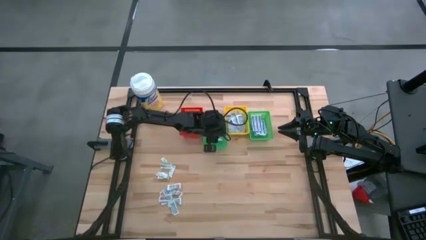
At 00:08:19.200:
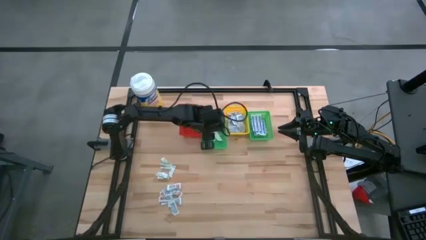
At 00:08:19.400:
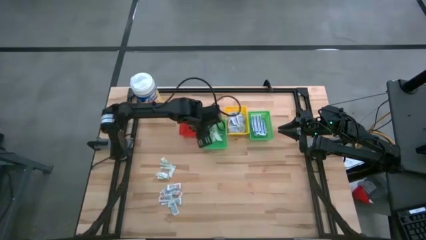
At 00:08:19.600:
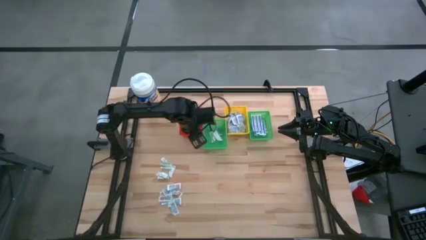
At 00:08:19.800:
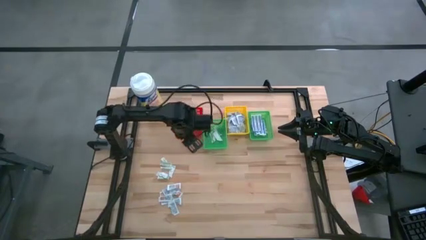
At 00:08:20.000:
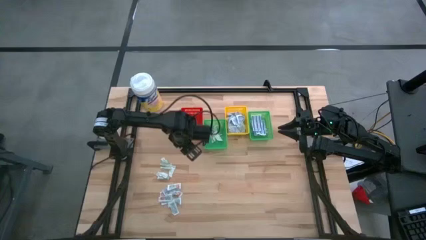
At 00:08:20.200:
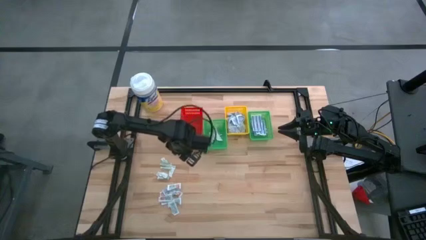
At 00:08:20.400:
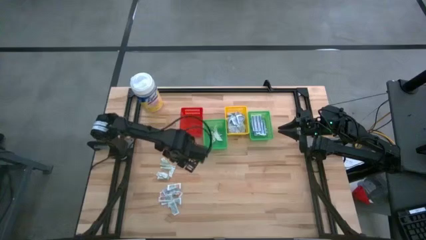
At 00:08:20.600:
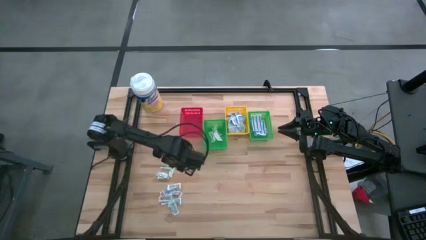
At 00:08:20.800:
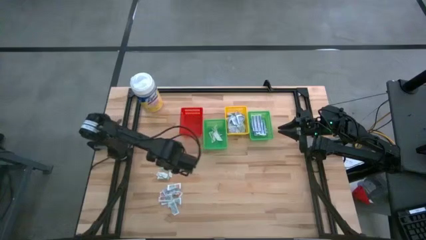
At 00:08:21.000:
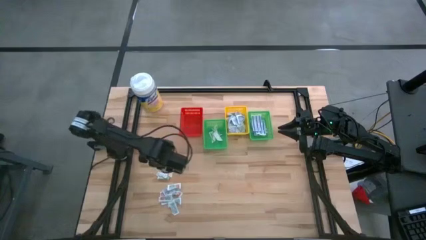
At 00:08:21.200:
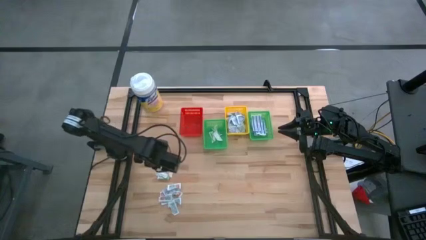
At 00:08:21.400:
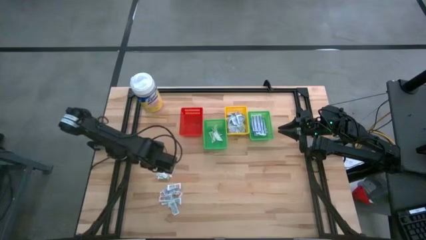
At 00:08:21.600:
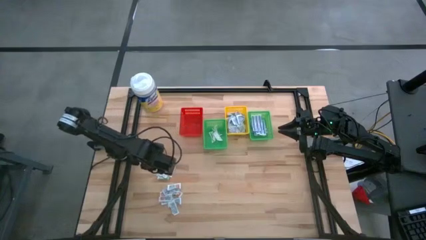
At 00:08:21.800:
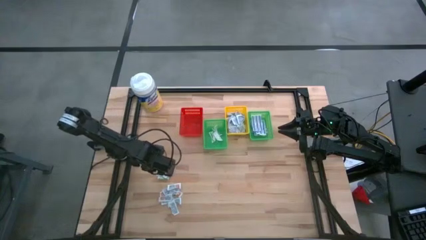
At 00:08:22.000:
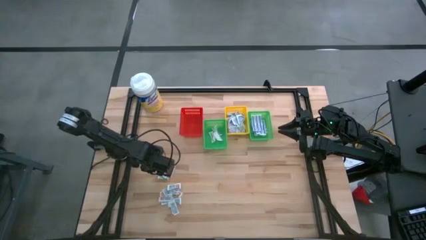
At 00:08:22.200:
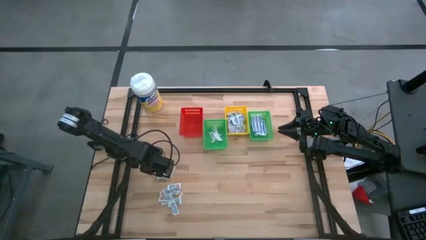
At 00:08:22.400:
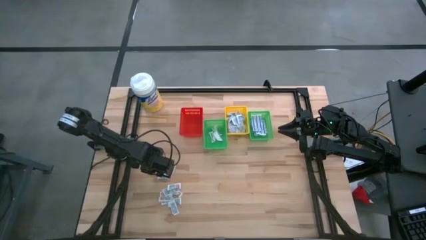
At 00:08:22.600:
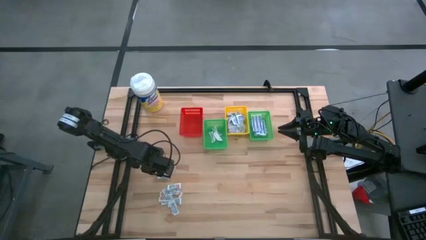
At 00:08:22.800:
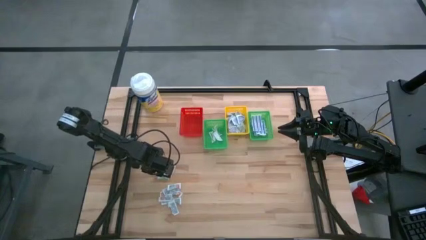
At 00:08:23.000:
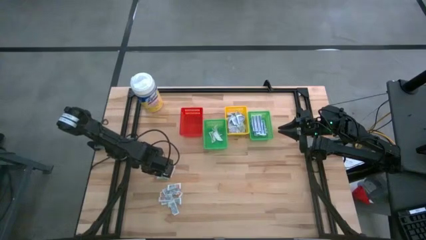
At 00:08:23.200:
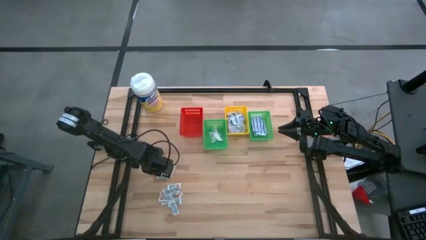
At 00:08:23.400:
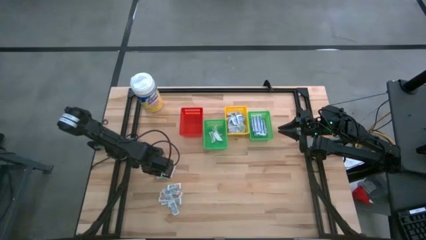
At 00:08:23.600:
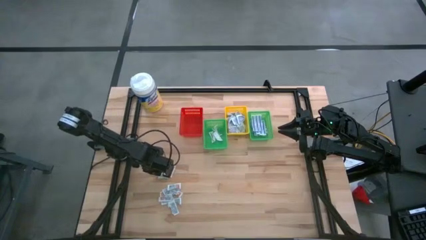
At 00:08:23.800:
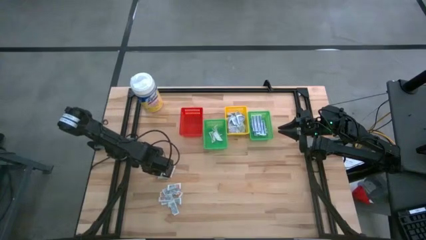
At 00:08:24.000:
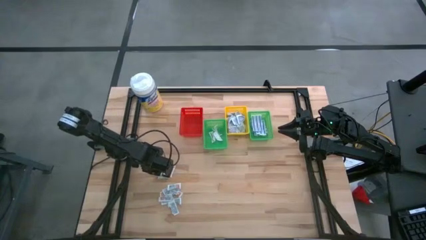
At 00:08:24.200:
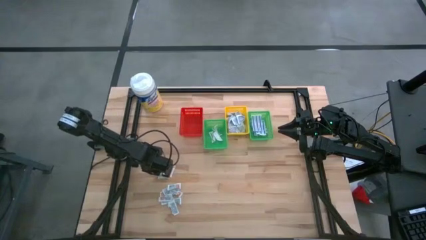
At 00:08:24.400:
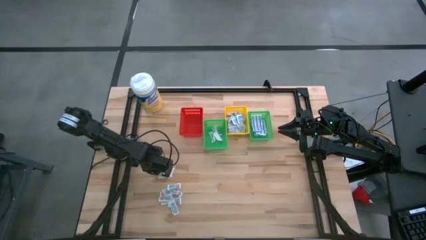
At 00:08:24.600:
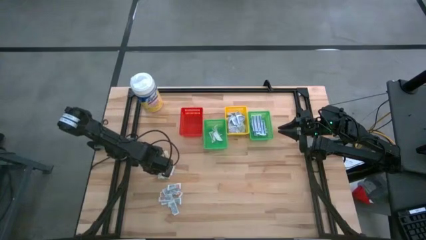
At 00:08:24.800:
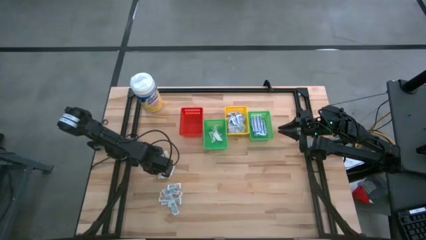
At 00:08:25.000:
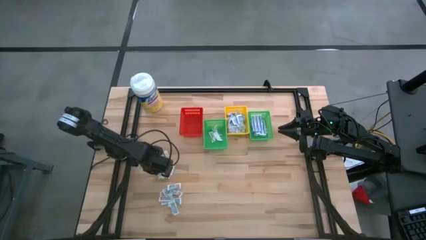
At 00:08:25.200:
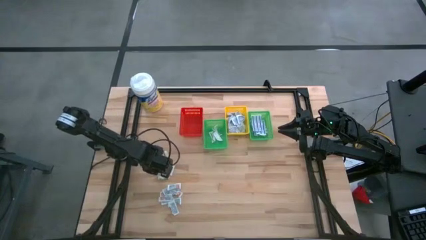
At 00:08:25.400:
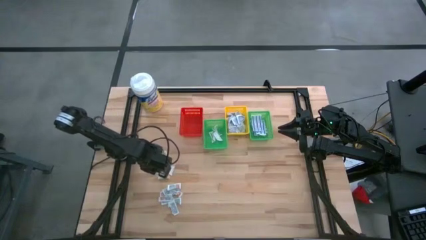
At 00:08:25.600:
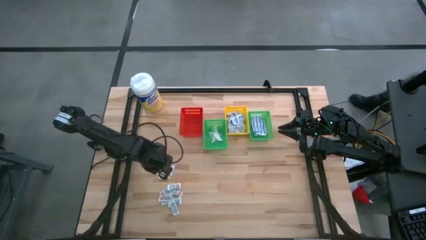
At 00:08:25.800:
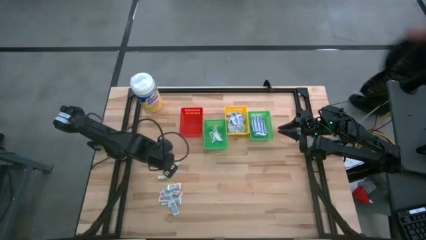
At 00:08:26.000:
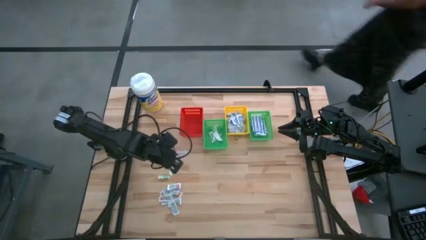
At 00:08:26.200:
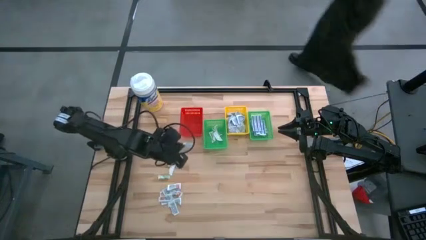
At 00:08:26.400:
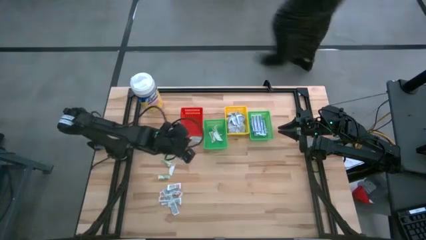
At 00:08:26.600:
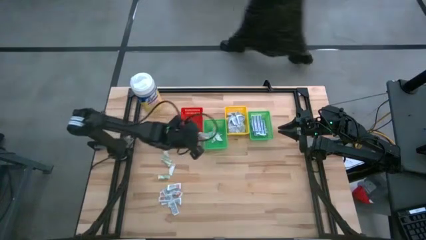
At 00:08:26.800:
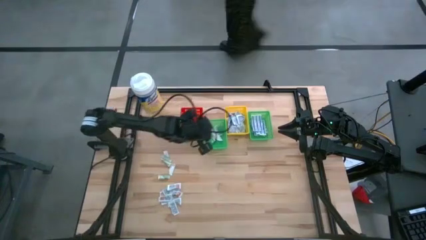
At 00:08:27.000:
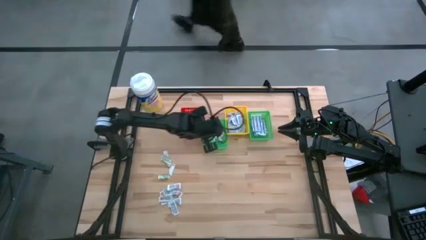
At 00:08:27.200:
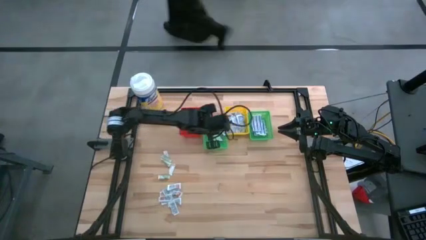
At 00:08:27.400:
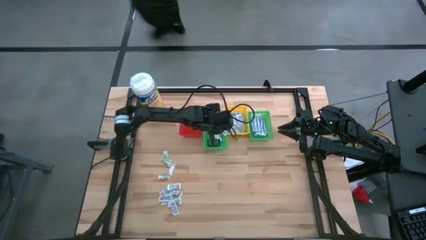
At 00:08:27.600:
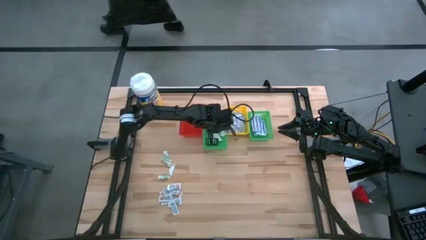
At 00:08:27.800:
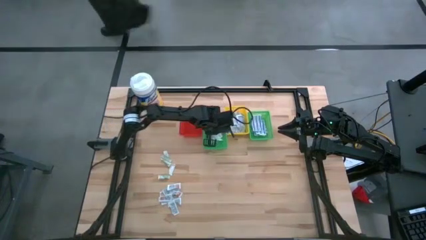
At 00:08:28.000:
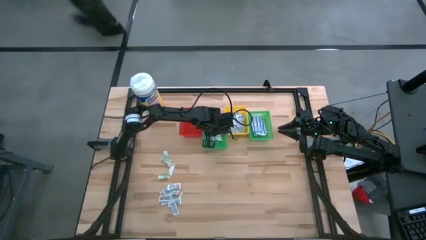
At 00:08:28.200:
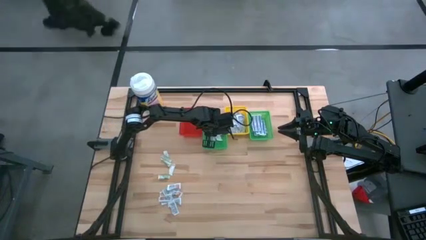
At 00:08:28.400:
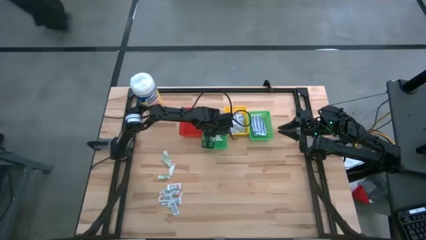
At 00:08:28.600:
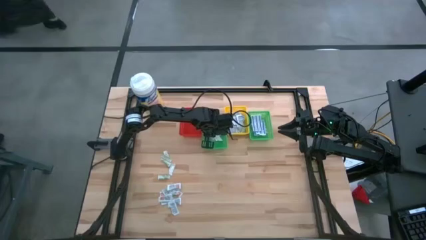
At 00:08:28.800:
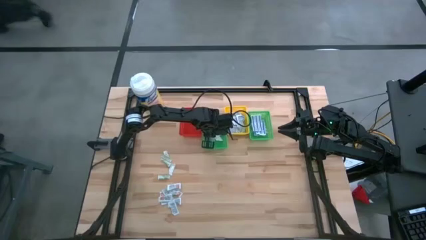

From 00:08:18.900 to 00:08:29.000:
Task: Pick & Place First Aid Supplies
Put the bandage into the left green basket

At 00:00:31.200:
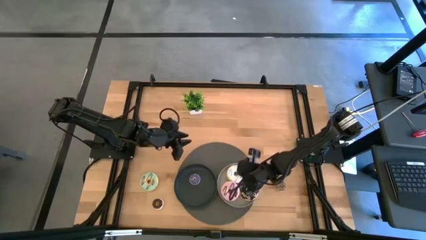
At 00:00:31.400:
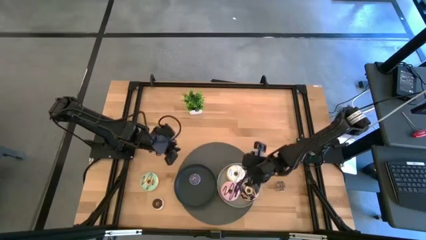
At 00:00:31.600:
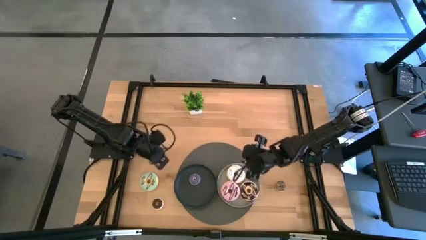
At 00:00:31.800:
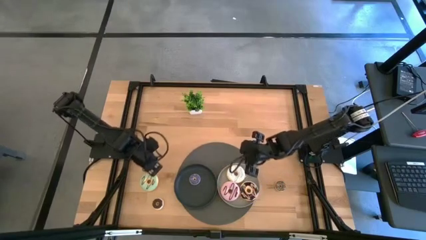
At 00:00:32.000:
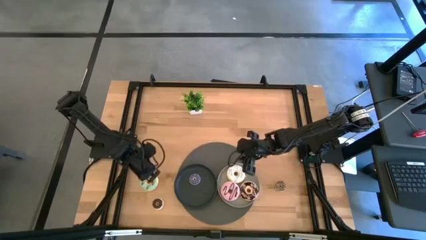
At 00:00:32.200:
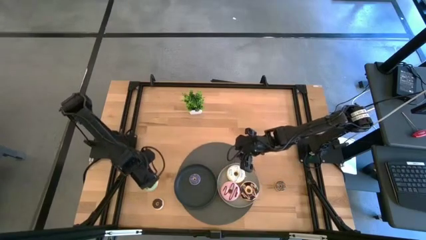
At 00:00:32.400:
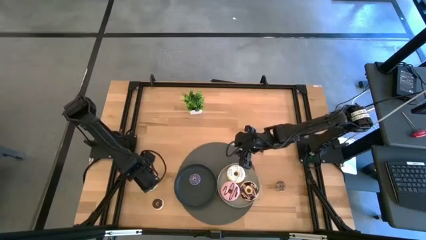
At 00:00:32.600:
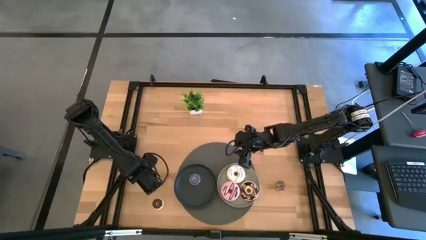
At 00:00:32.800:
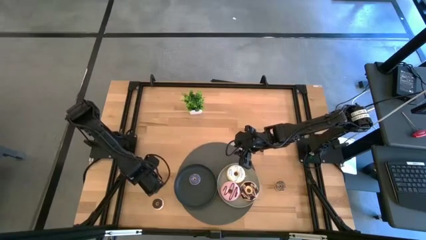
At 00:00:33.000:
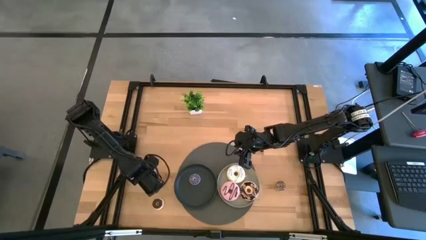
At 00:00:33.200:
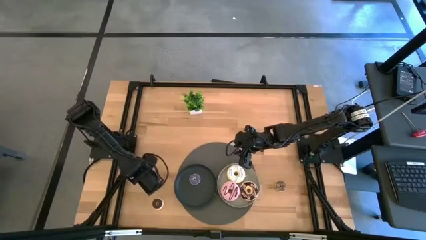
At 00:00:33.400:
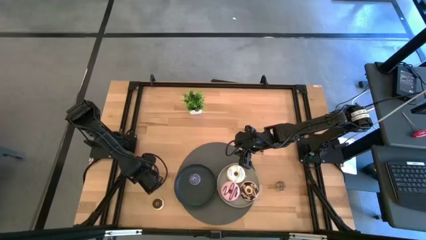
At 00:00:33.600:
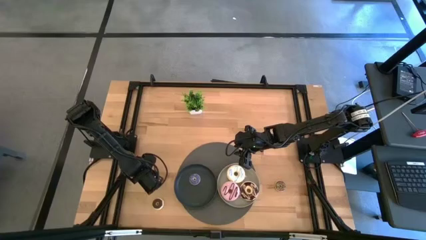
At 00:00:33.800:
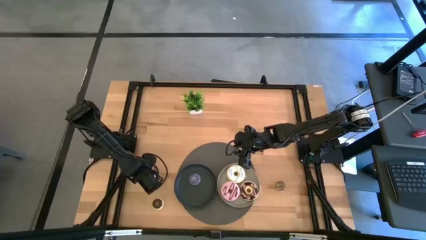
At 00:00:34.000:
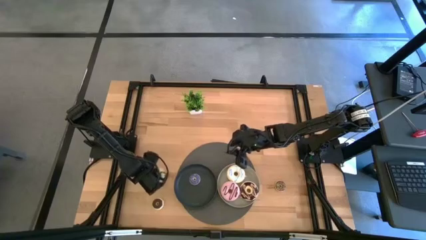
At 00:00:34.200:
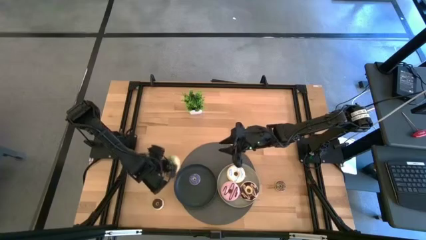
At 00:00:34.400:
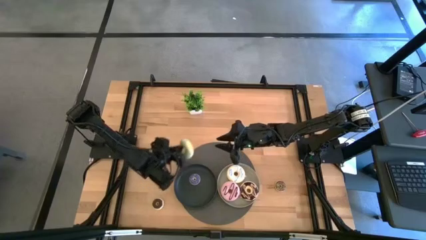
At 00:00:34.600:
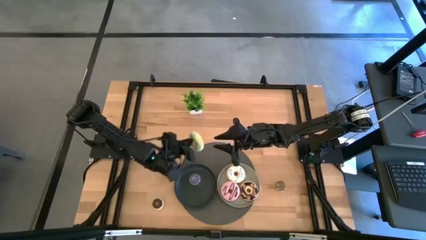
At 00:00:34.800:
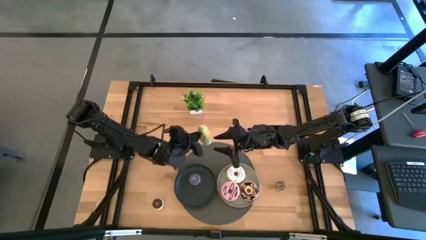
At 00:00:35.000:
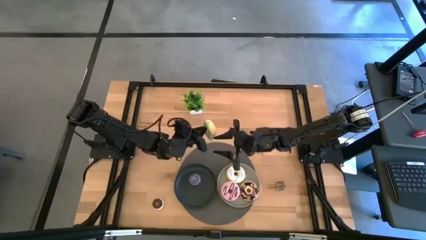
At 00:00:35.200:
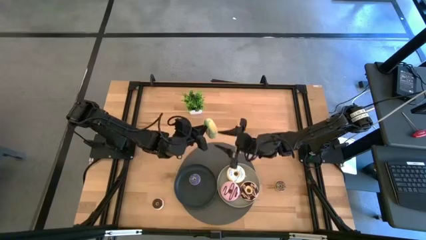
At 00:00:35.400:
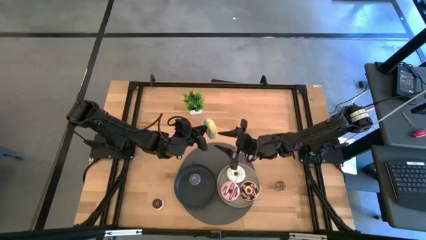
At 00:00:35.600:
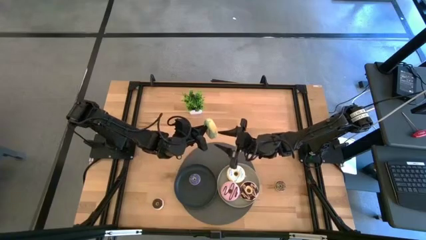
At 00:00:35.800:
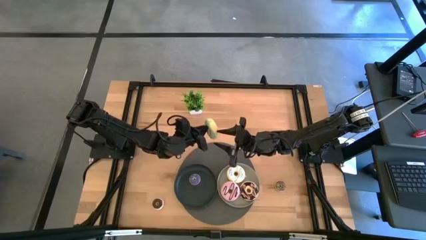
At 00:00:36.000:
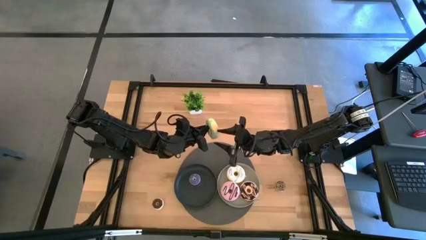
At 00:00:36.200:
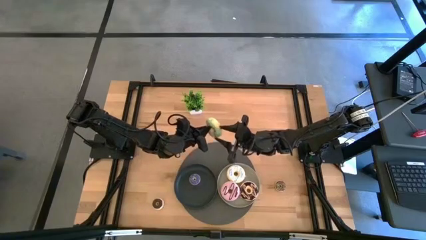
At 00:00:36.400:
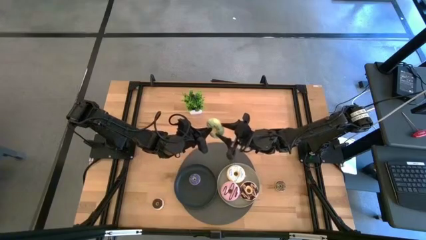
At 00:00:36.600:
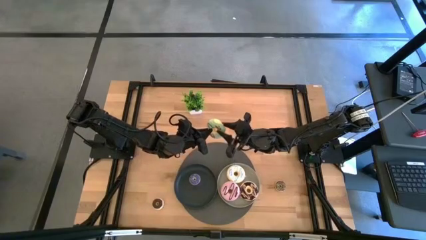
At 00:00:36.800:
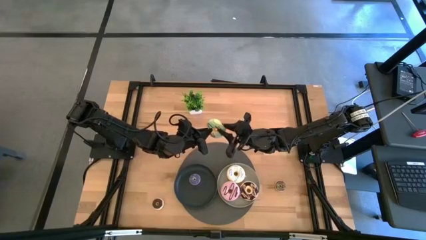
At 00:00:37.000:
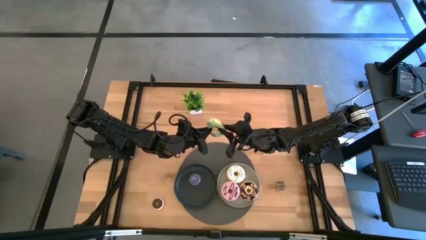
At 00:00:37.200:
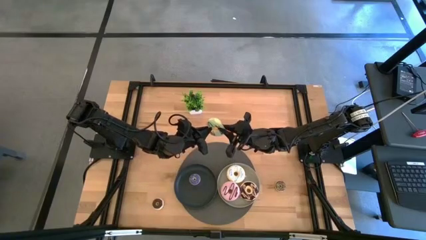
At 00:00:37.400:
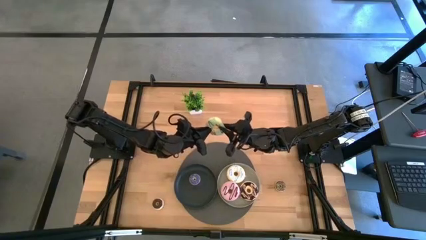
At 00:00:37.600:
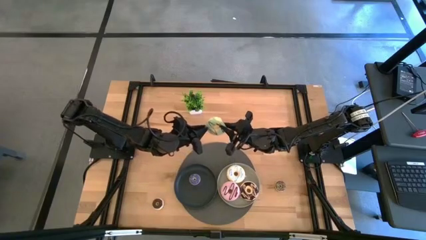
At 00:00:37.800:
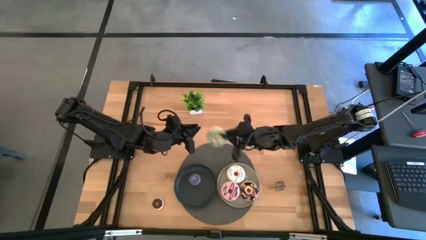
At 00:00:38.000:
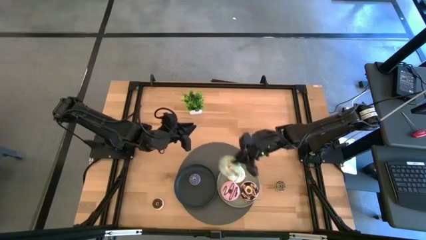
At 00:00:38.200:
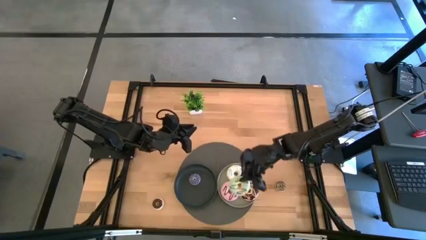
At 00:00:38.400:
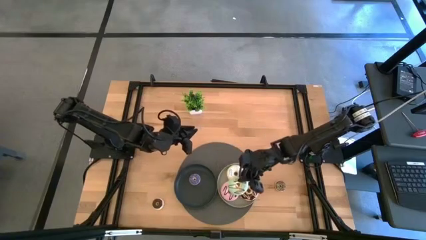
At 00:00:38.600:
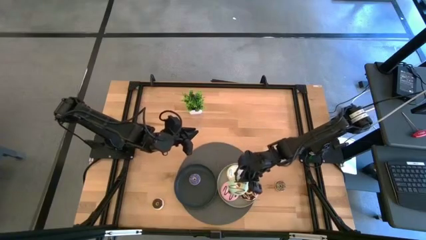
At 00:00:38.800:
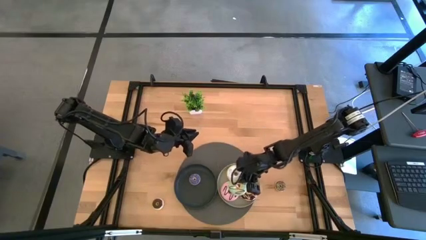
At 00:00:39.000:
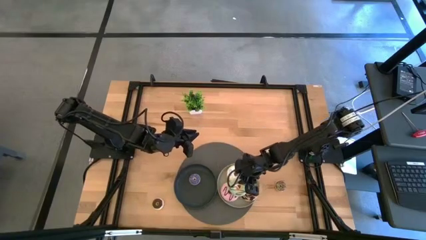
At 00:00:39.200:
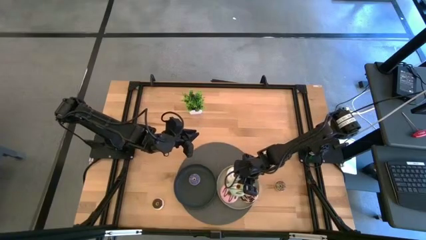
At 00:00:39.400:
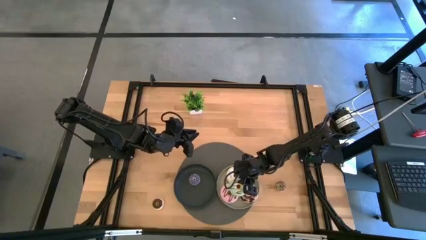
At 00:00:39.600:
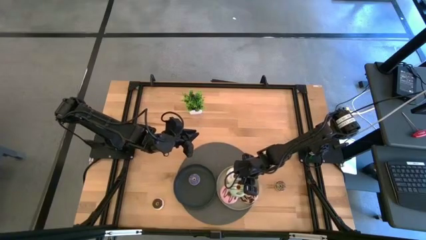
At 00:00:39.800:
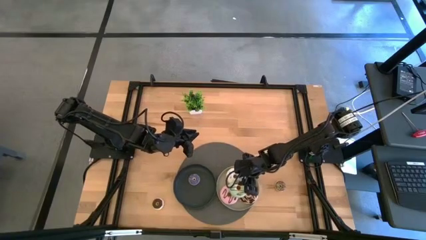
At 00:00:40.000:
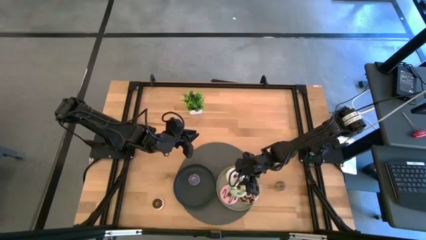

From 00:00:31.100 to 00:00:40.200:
Task: Pick & Place donuts
Put the large blue donut on the gray plate
